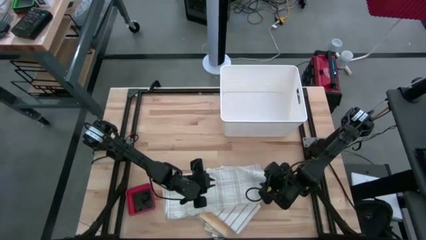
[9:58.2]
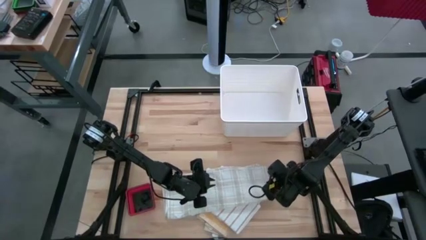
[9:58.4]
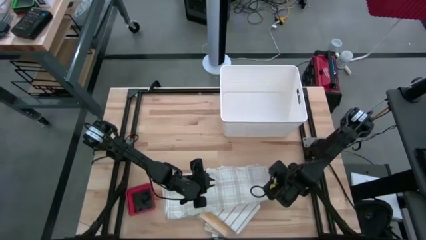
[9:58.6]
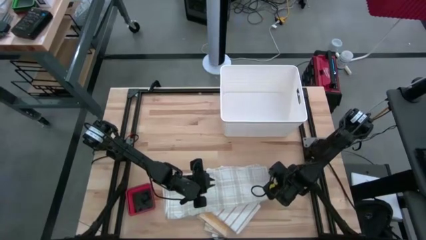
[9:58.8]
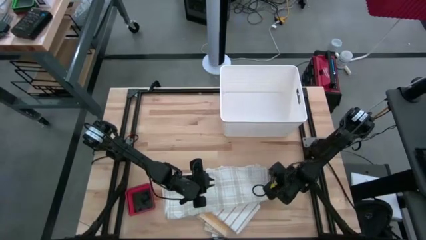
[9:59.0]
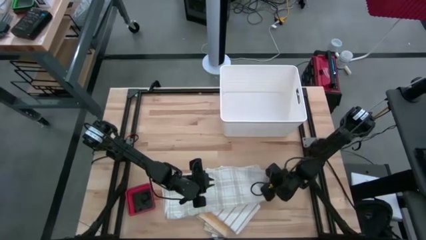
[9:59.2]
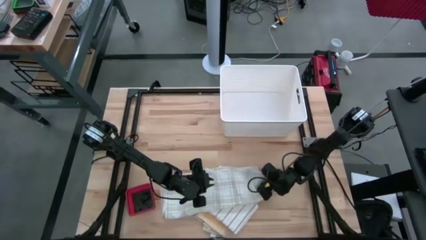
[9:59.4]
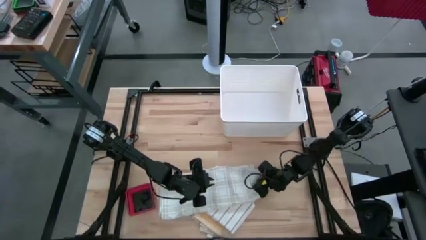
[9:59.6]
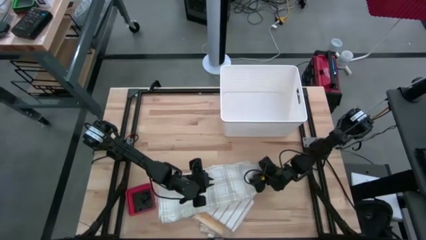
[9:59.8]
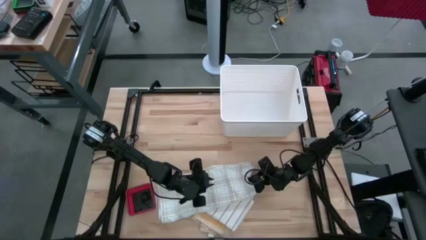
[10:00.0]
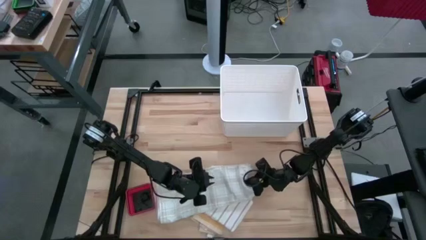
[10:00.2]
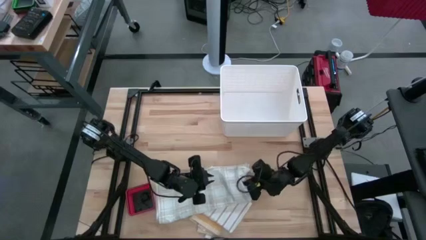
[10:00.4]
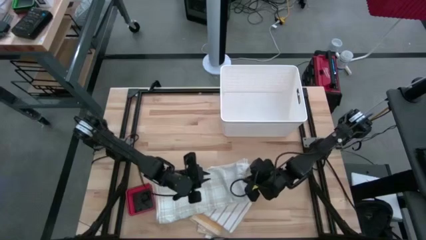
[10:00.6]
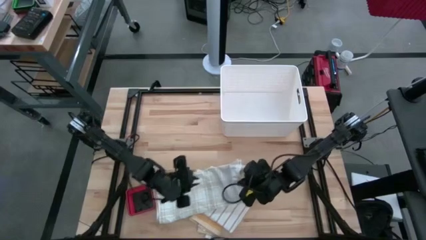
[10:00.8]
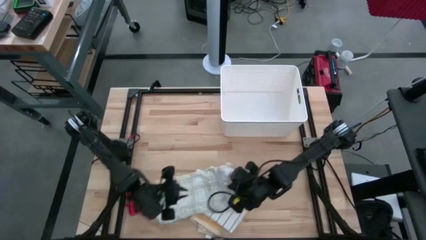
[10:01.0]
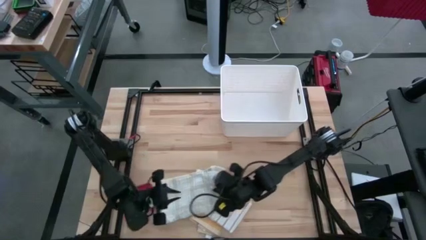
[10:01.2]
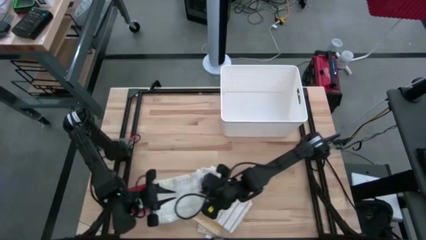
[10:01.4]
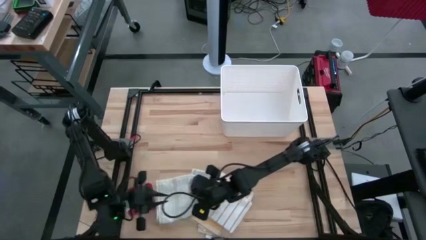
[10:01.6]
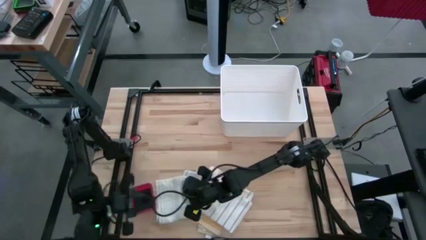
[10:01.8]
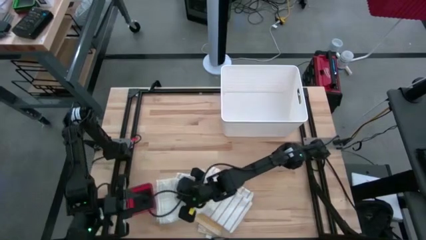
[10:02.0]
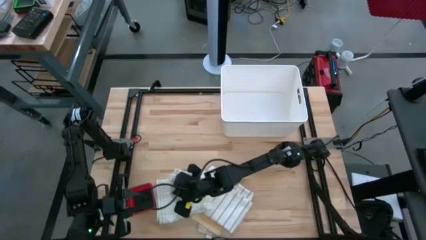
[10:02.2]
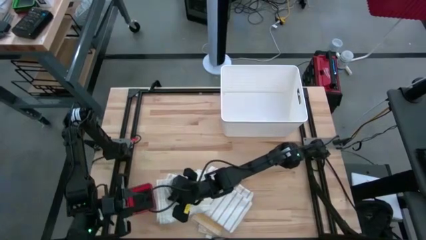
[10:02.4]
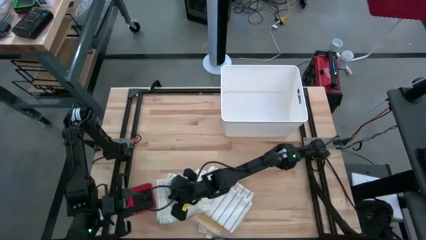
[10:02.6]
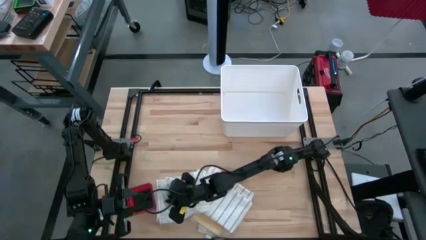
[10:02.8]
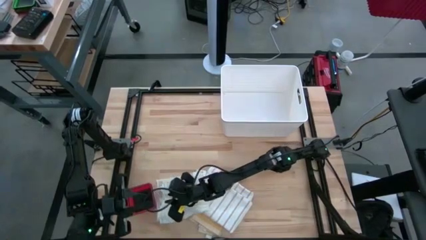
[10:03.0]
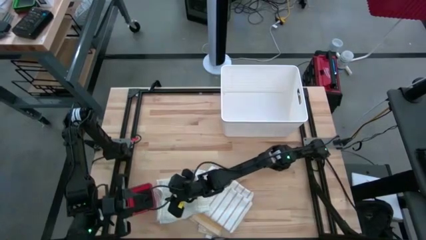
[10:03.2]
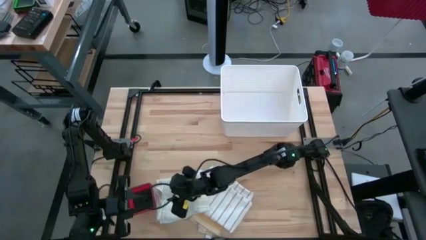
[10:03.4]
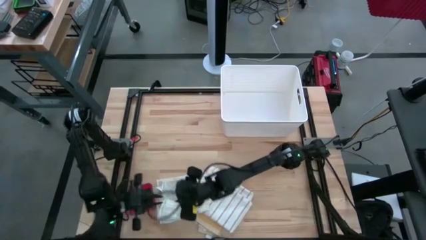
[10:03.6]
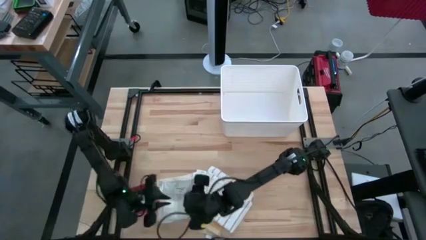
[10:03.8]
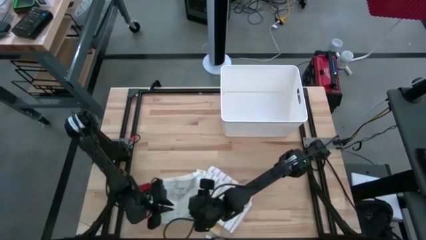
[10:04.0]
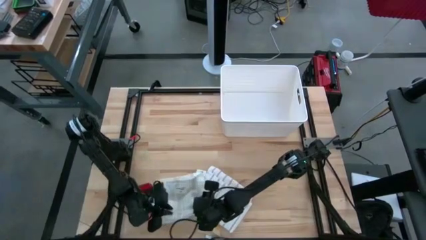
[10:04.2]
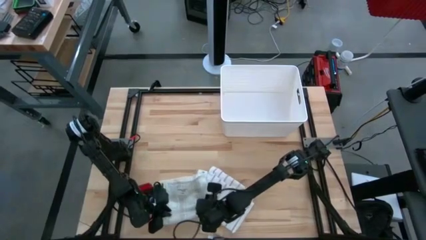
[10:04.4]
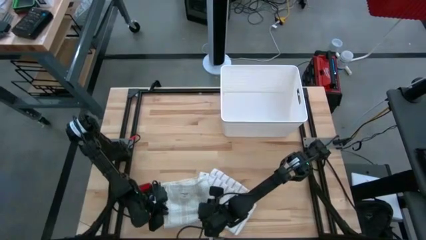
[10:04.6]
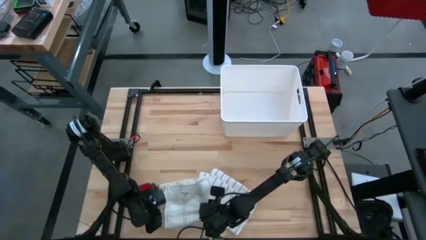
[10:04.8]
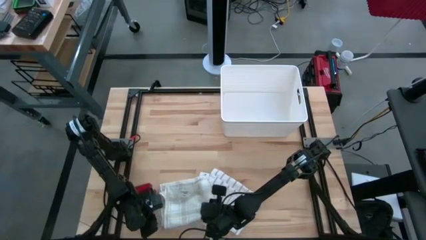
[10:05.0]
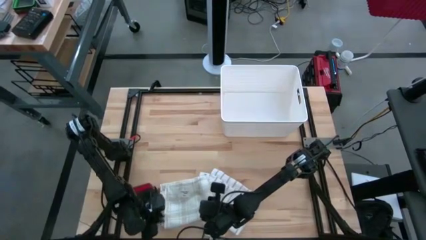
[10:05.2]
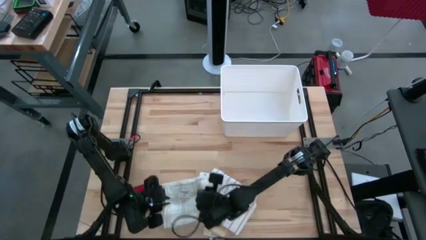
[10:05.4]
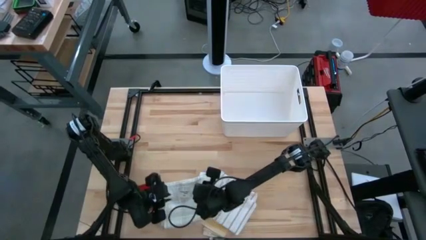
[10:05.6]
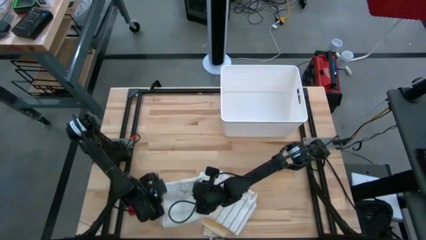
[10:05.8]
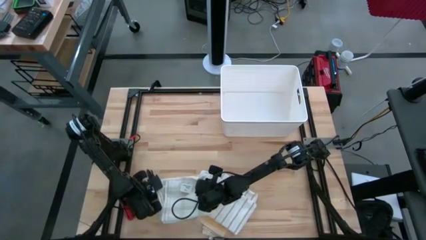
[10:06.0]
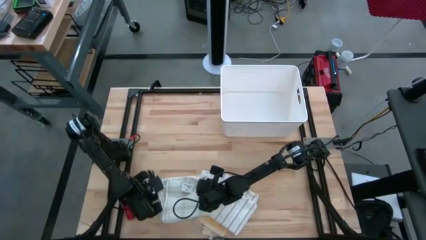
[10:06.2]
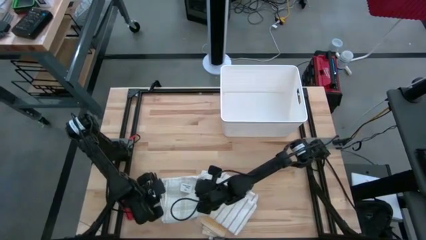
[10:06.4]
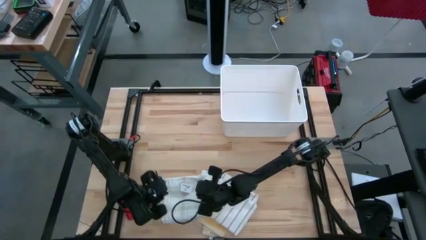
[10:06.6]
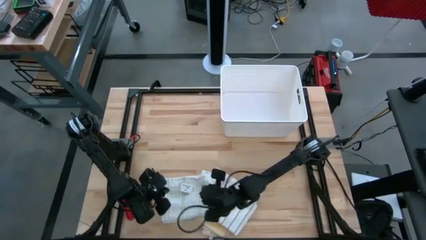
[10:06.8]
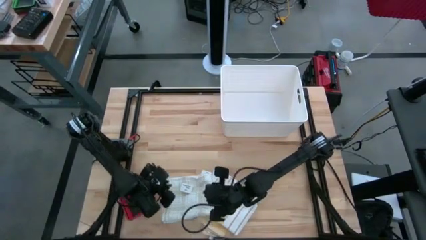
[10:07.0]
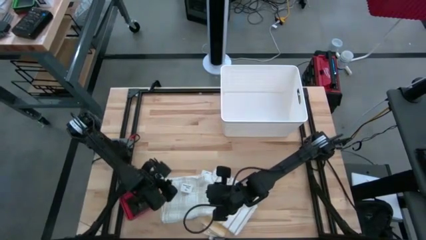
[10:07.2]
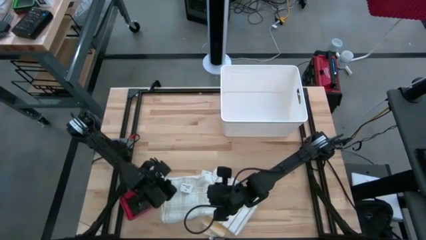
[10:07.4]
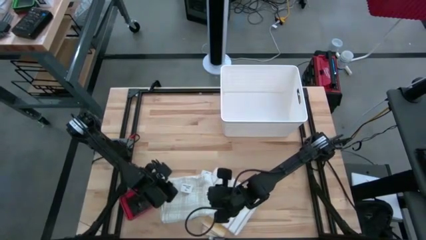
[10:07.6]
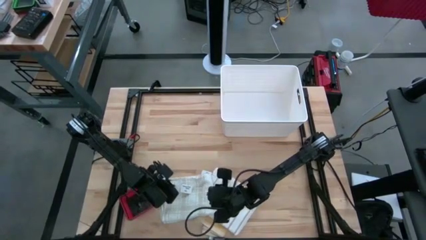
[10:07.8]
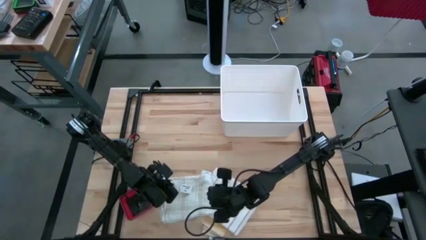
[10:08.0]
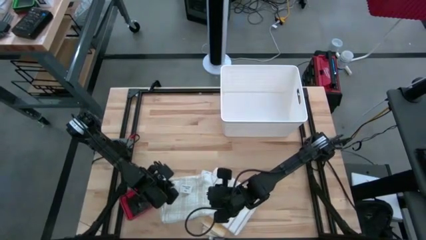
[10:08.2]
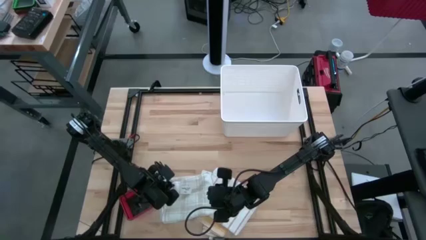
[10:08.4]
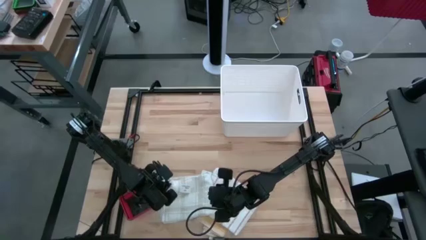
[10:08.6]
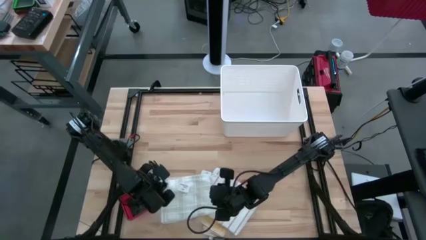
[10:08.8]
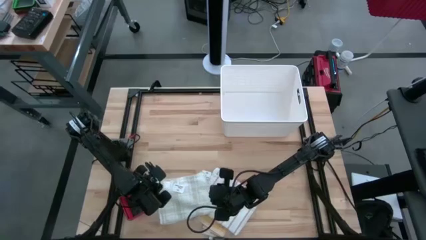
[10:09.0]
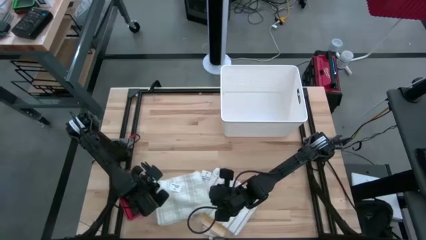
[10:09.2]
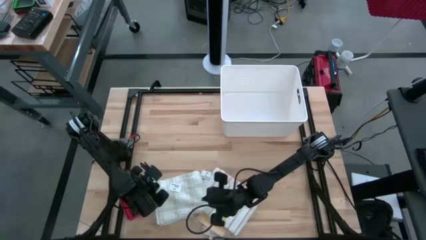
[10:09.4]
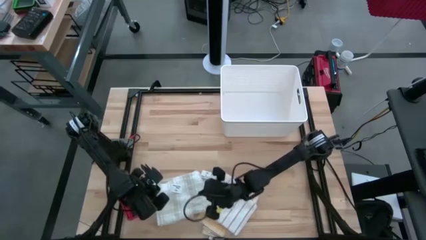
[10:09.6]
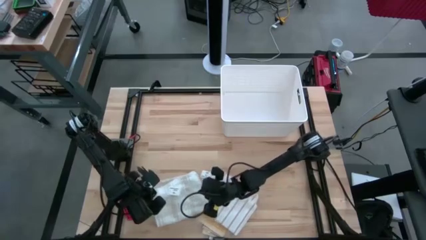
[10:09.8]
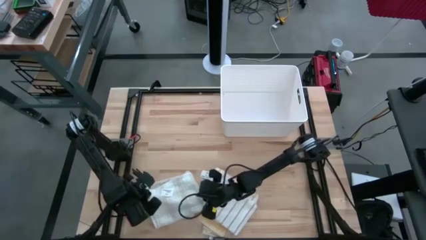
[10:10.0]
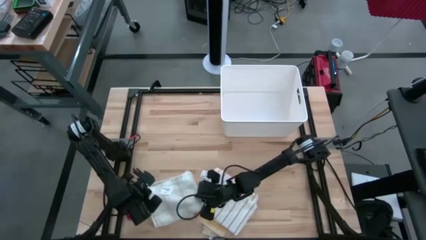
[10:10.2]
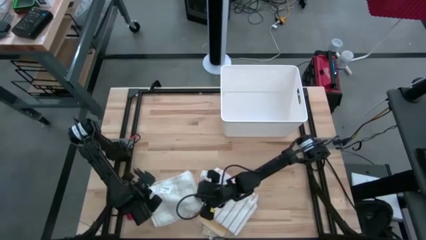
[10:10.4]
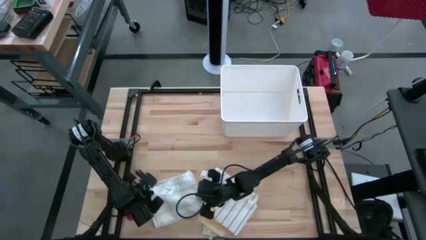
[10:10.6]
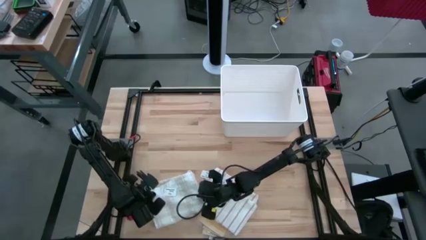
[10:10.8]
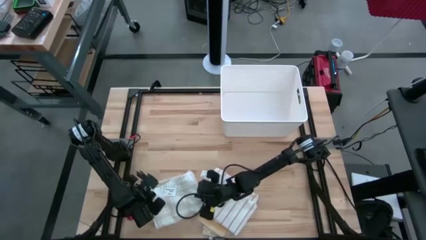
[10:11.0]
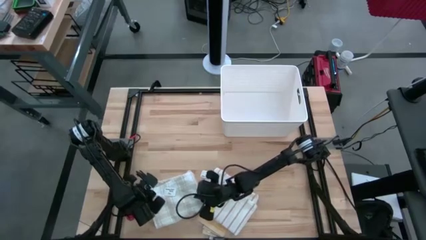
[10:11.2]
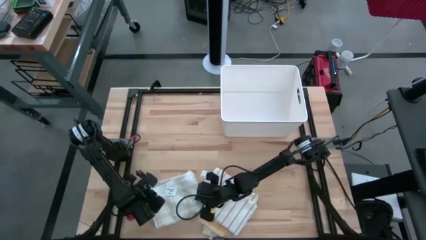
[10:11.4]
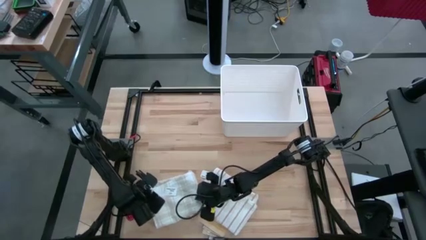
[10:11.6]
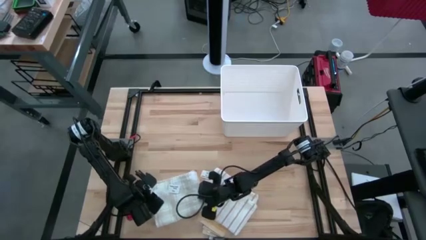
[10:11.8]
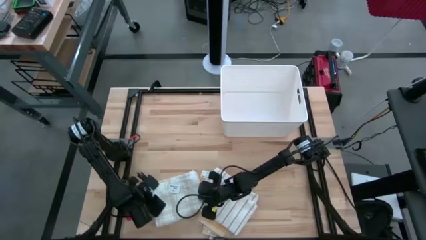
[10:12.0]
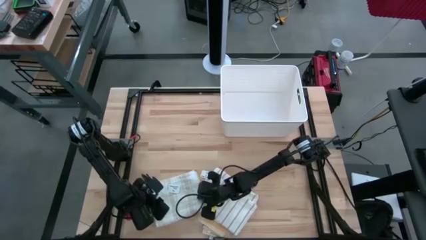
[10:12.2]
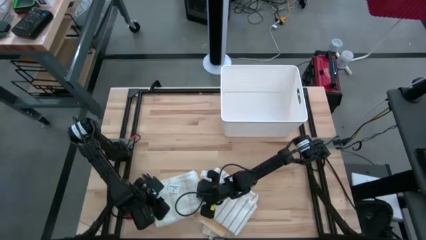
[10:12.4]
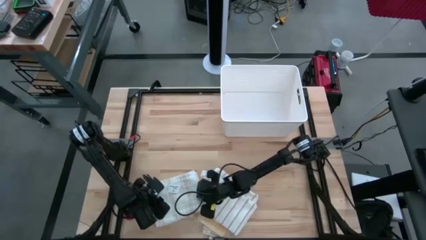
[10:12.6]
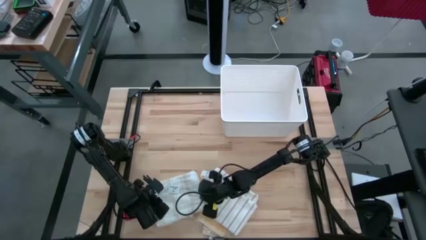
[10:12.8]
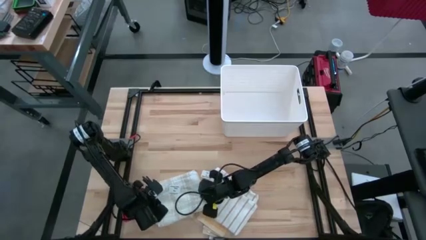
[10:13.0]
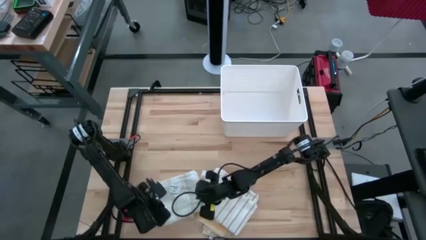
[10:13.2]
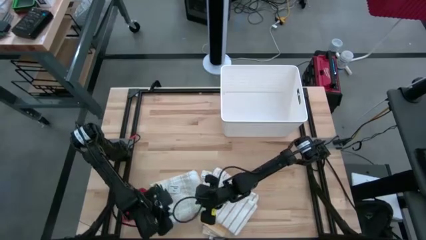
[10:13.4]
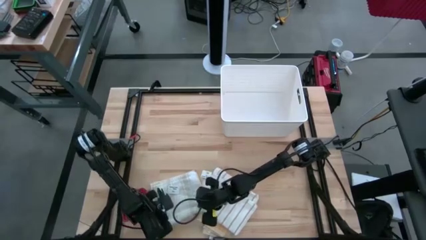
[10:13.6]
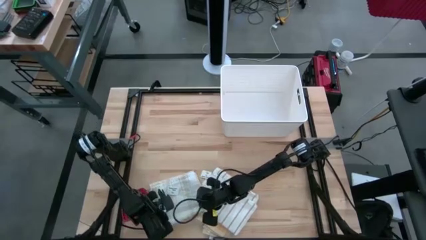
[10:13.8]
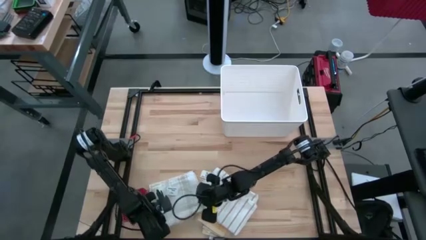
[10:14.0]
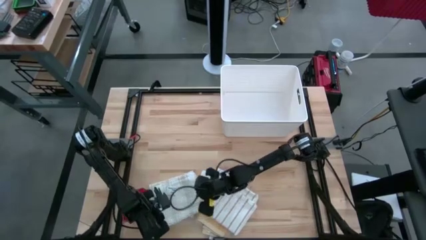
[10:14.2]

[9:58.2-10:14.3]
Task: Fold towel
Fold the light brown kitchen towel
